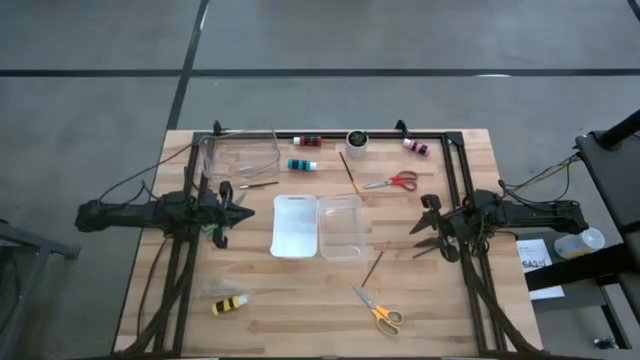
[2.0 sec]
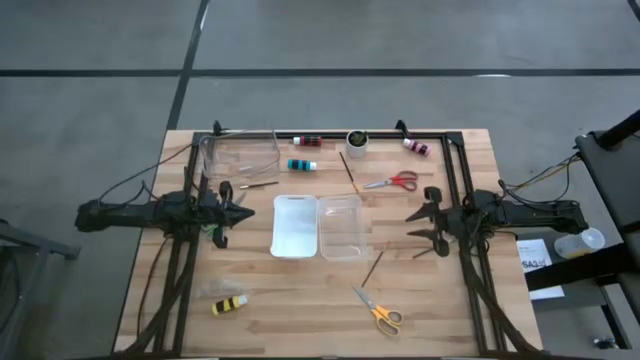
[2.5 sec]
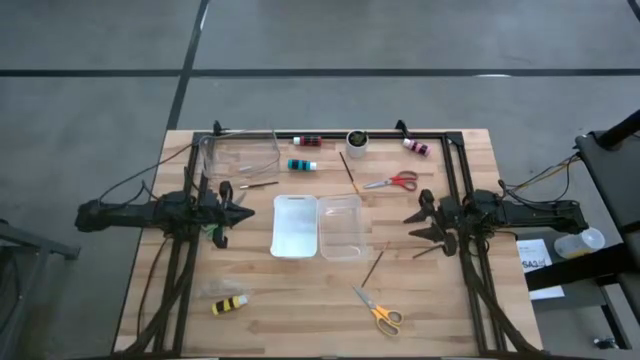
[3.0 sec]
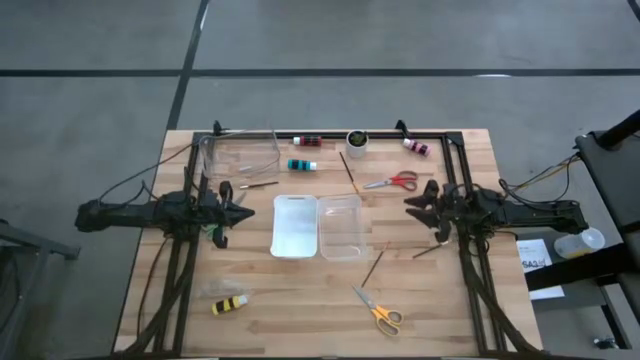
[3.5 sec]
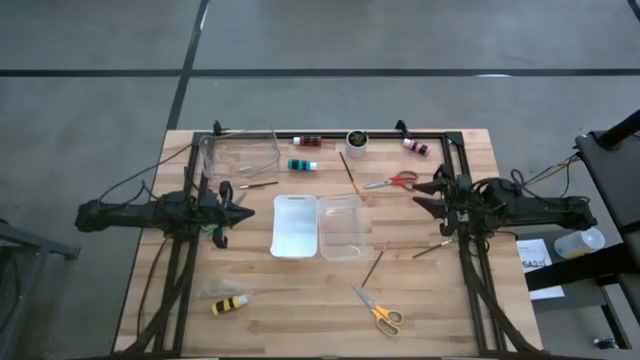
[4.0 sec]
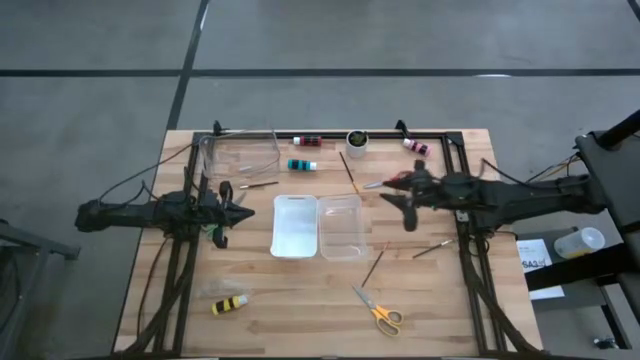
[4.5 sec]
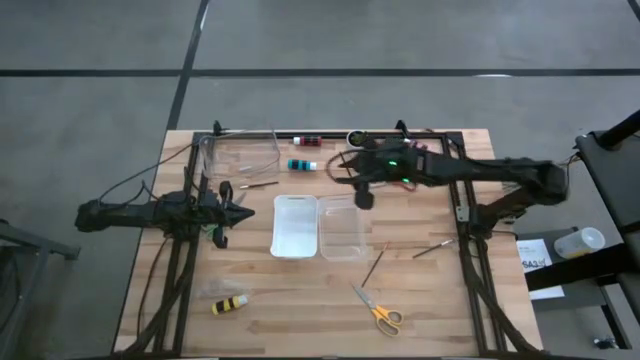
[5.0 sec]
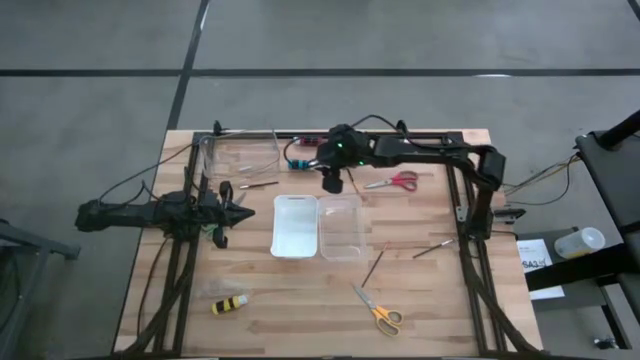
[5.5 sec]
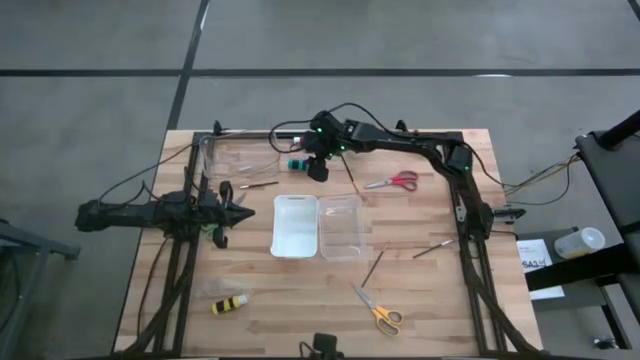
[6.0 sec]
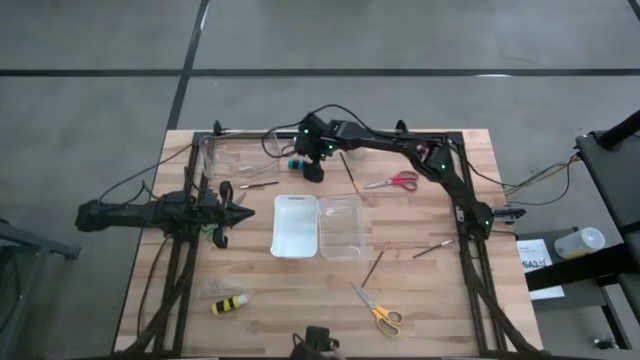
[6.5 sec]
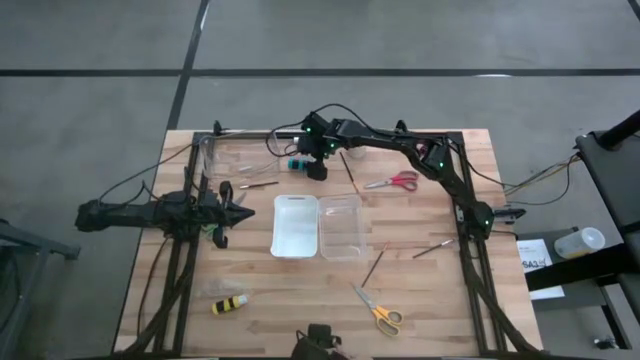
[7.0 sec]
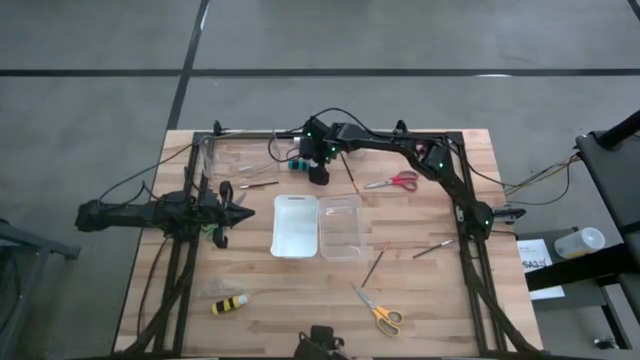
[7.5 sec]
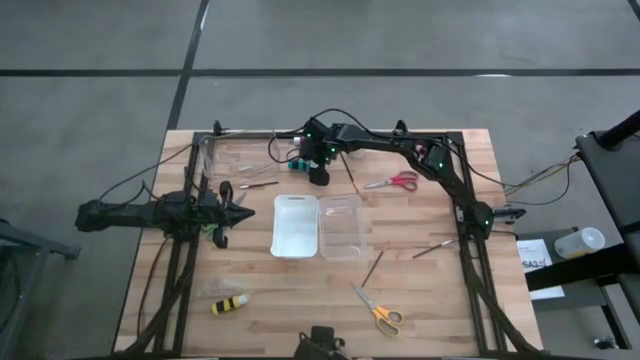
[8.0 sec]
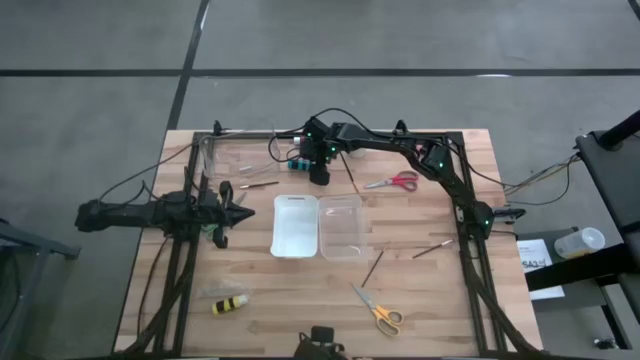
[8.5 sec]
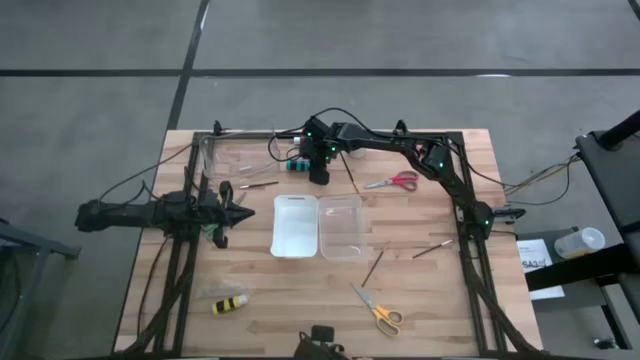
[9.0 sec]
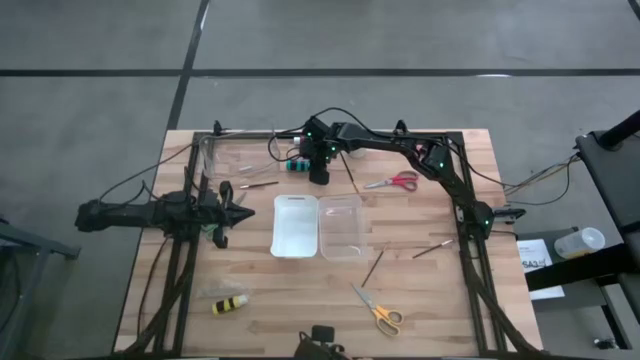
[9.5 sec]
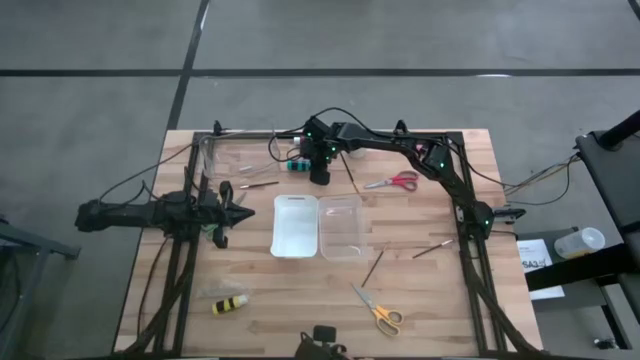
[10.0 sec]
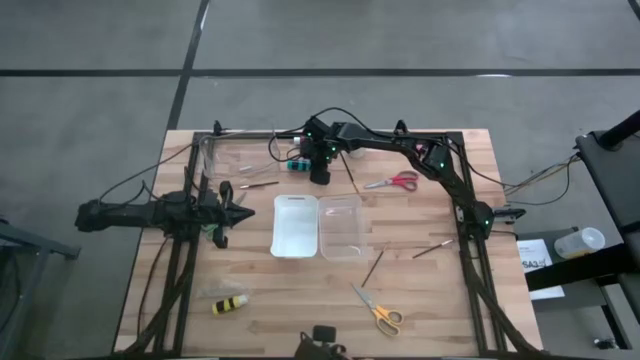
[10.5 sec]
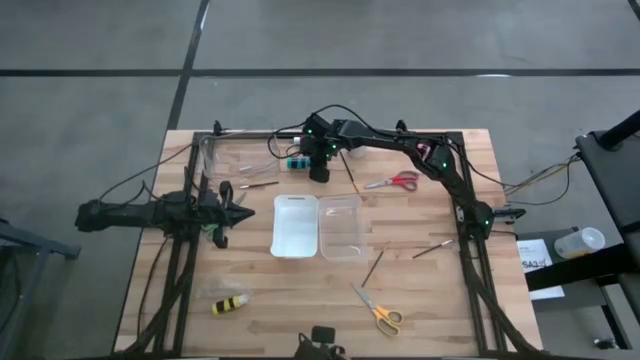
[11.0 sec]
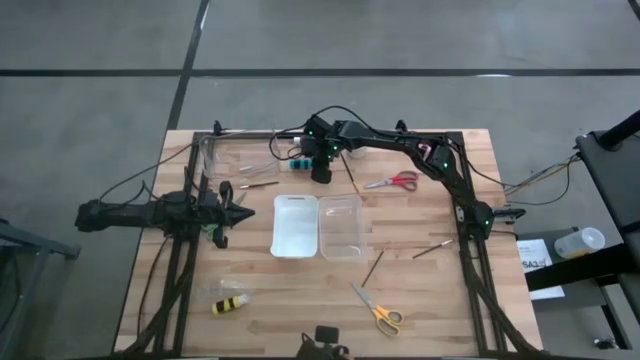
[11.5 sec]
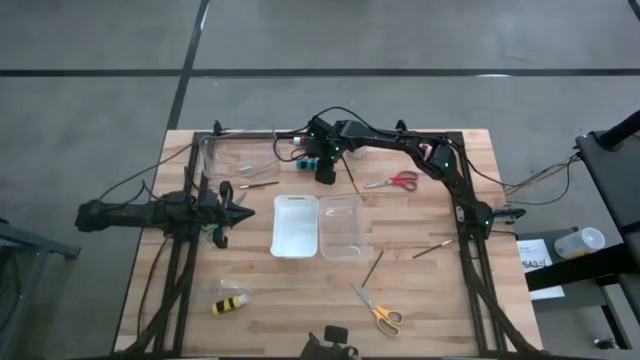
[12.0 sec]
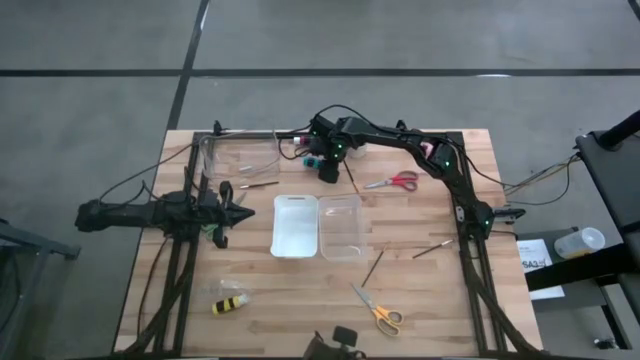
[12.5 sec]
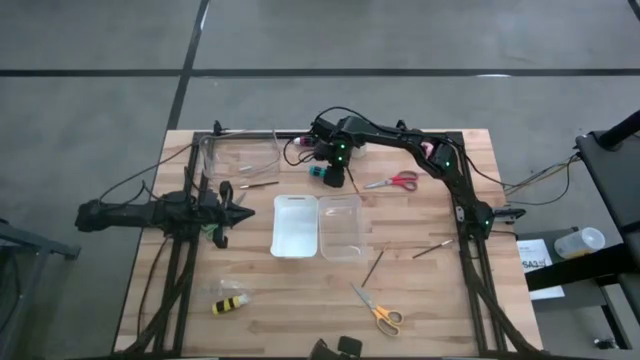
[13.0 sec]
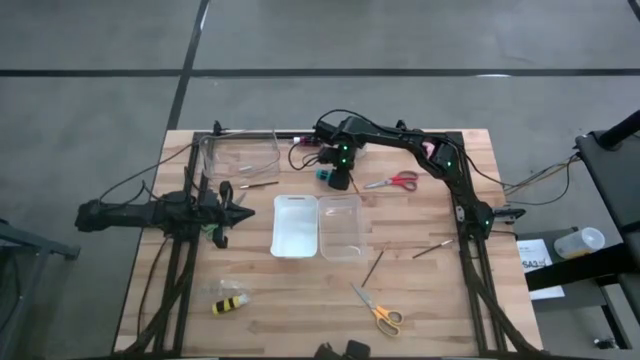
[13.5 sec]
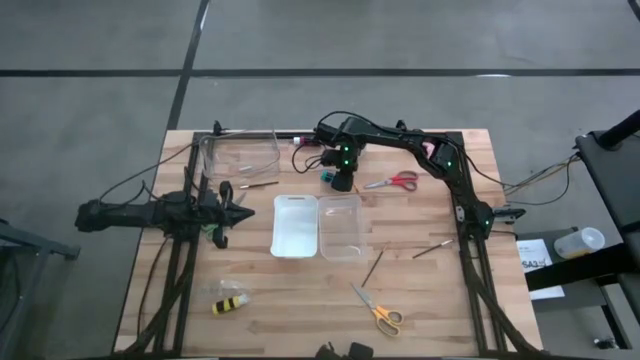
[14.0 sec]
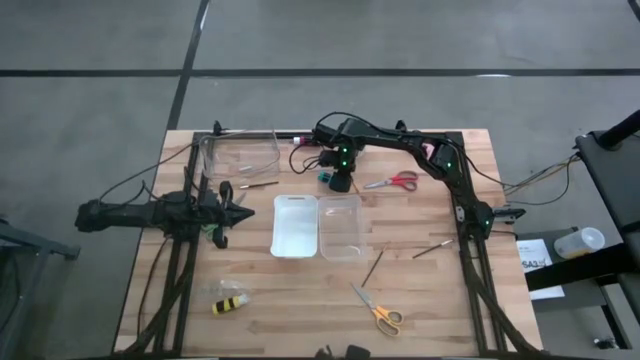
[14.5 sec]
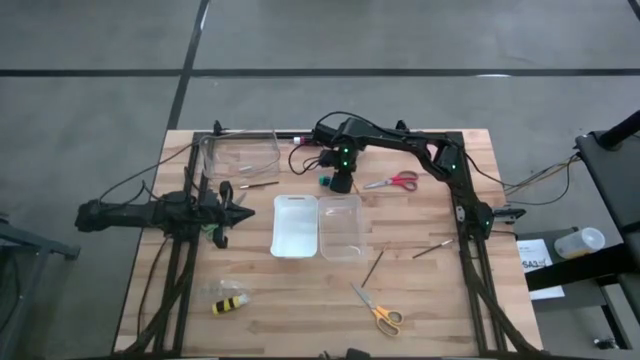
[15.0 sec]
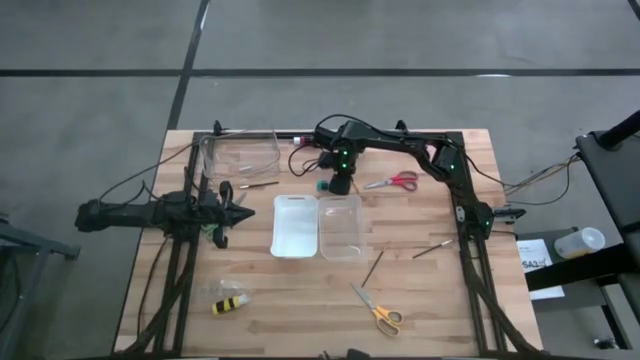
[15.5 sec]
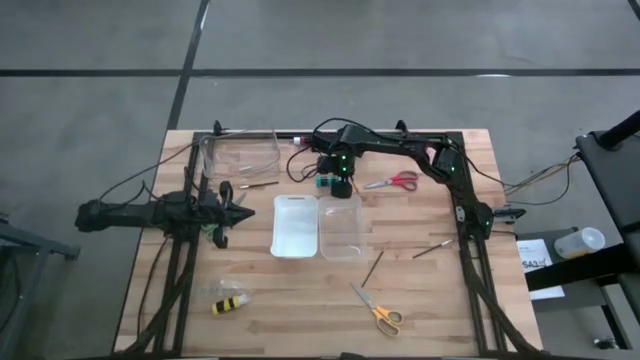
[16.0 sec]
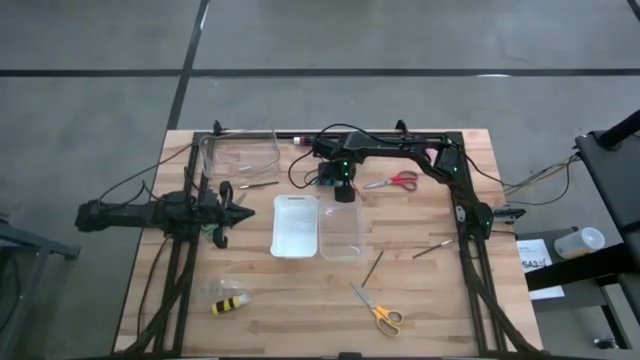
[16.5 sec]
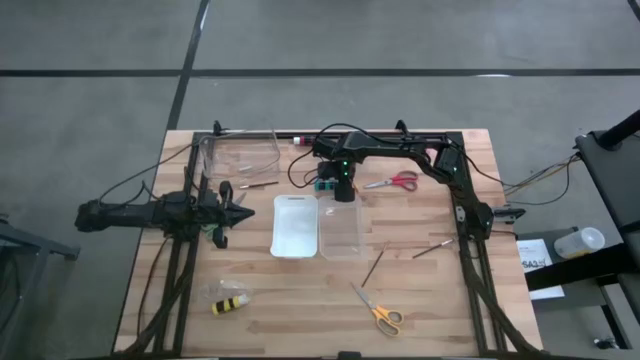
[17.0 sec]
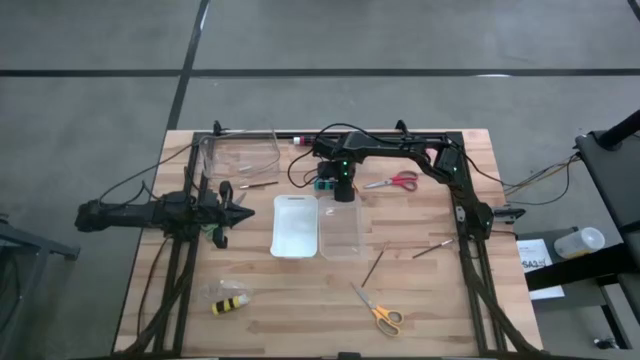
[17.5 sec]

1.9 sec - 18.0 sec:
Task: Pick & Place Paint Supplies
Put the blue paint bottle into the white bin

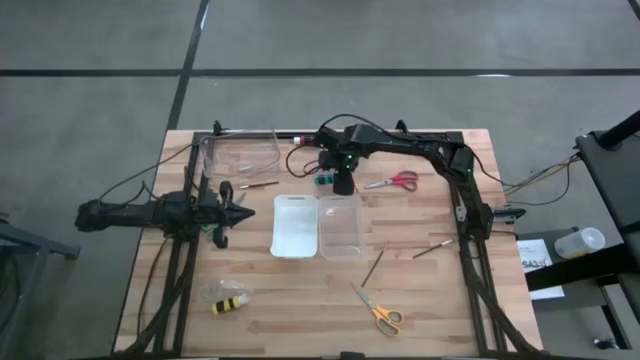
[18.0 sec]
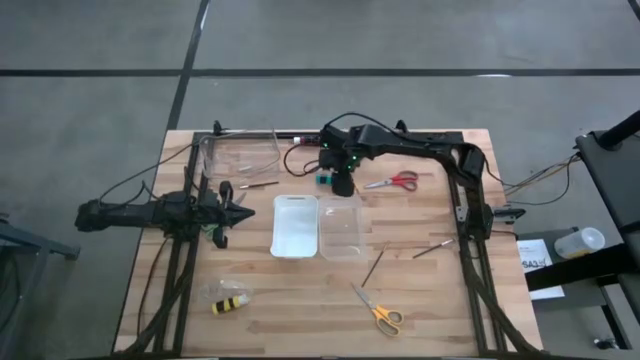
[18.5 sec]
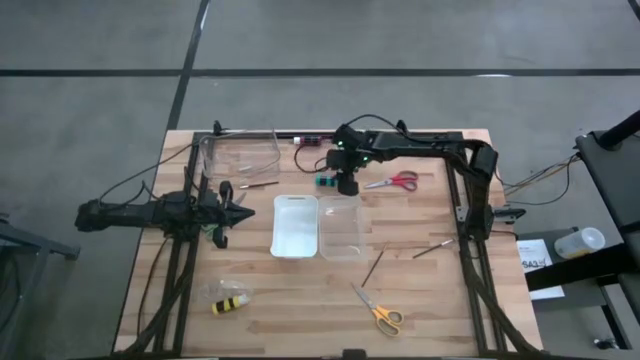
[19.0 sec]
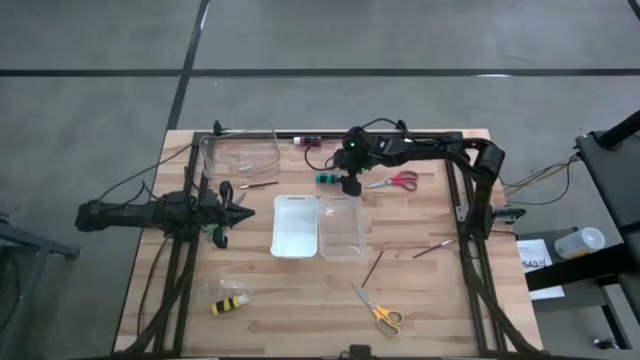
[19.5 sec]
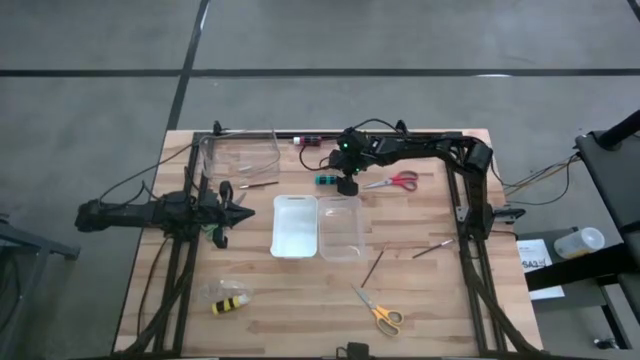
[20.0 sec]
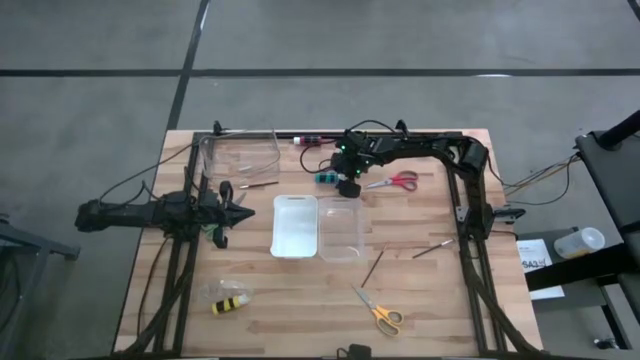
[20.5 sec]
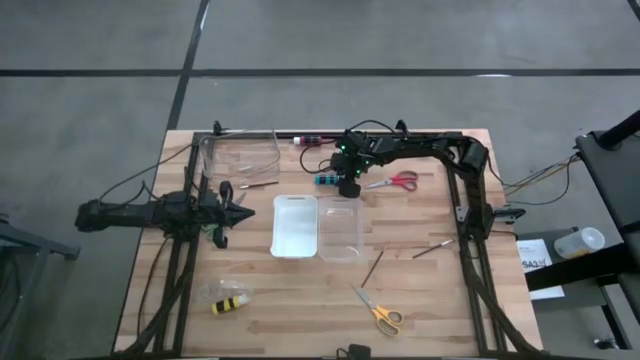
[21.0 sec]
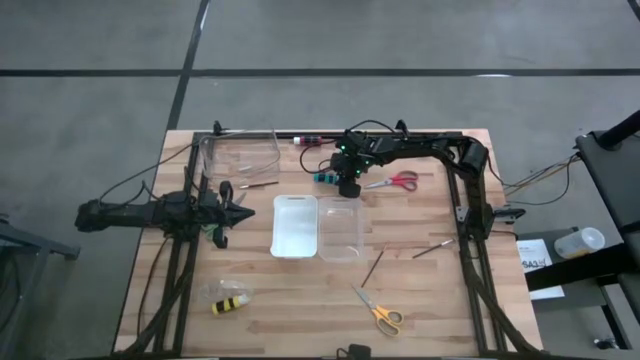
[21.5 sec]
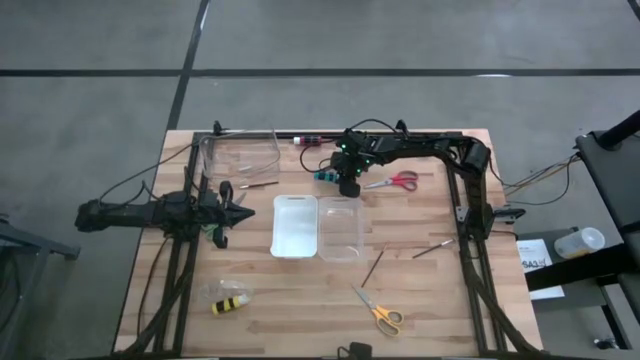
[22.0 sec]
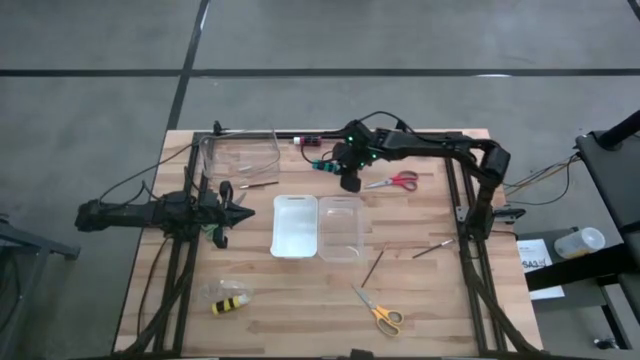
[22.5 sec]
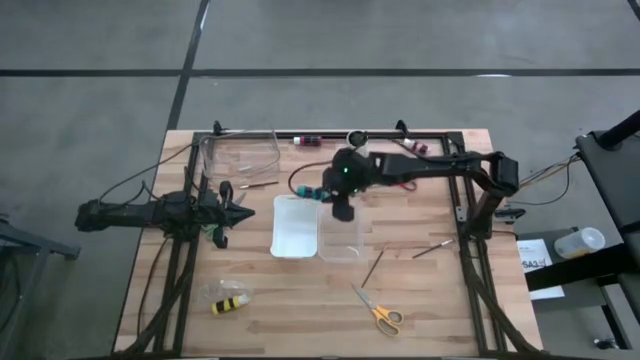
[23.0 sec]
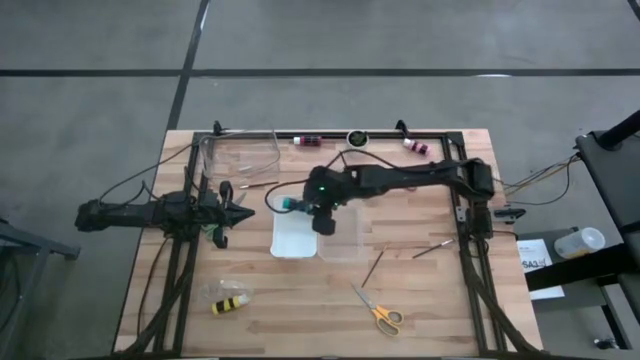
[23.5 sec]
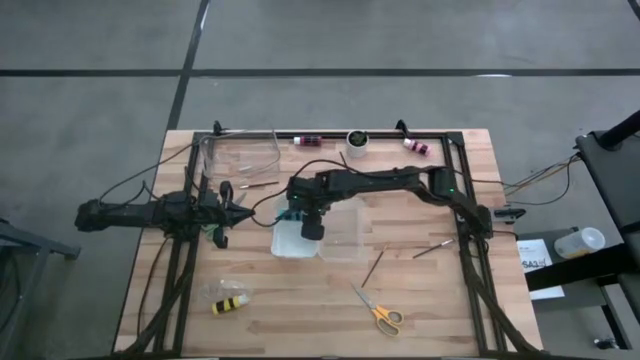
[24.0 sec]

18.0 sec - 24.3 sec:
Put the blue paint bottle into the white bin
